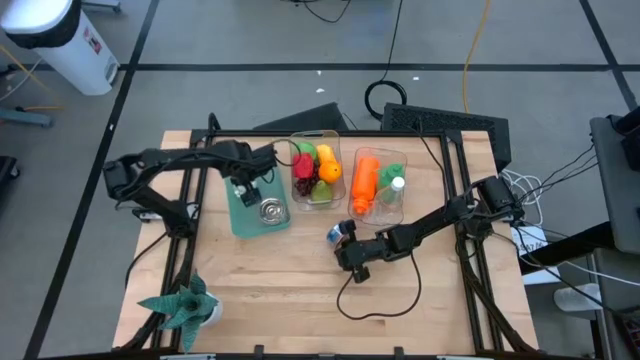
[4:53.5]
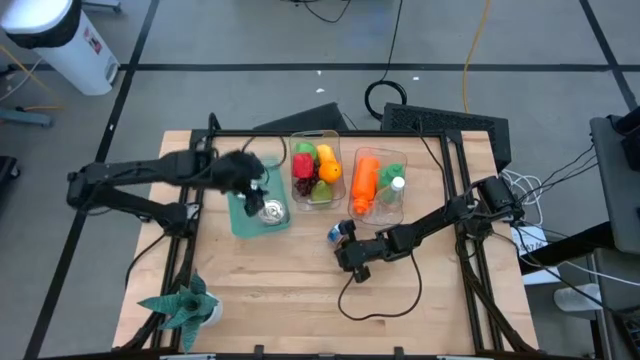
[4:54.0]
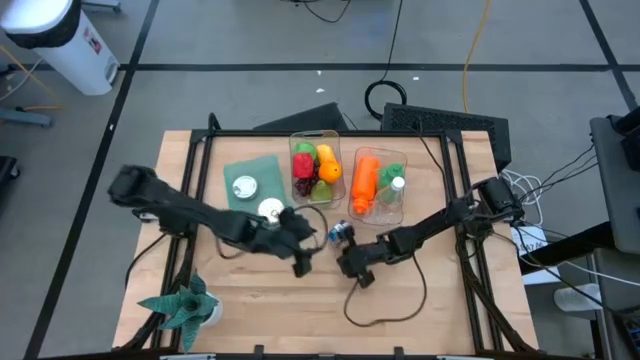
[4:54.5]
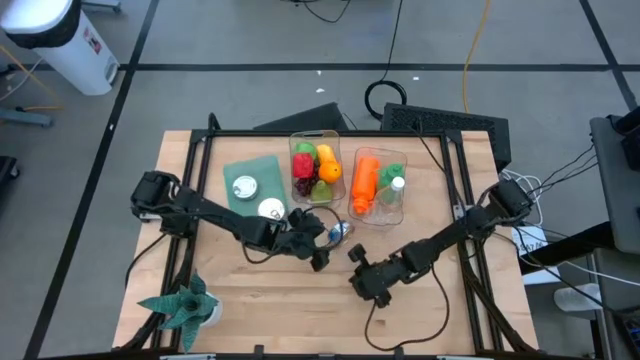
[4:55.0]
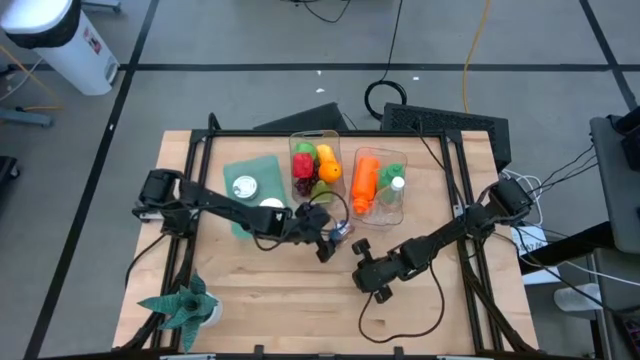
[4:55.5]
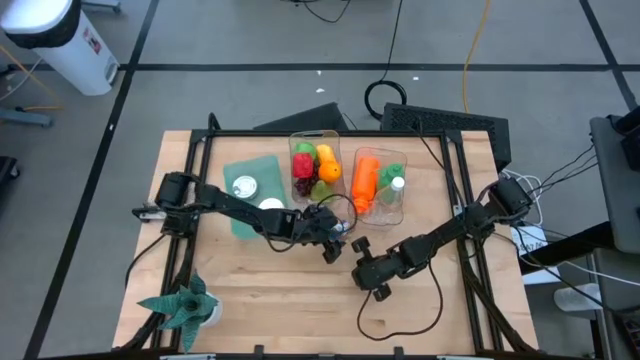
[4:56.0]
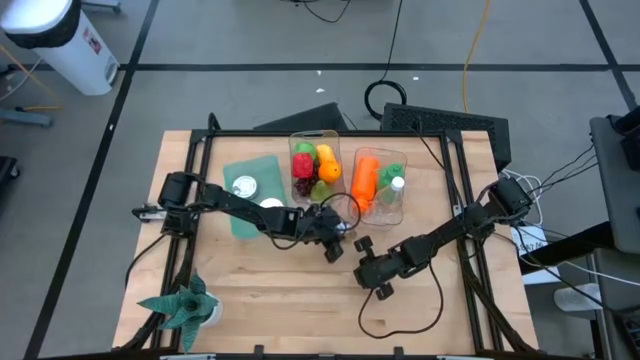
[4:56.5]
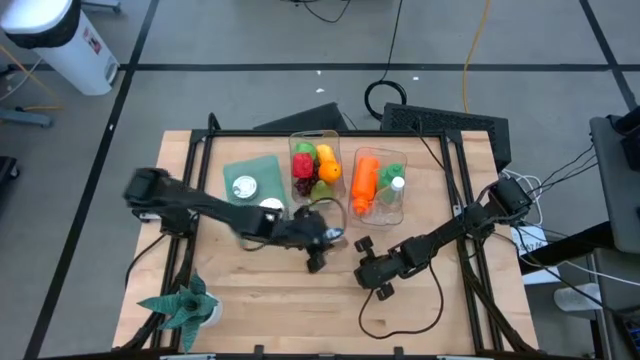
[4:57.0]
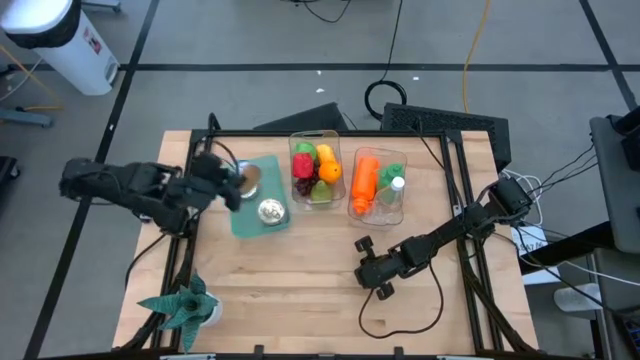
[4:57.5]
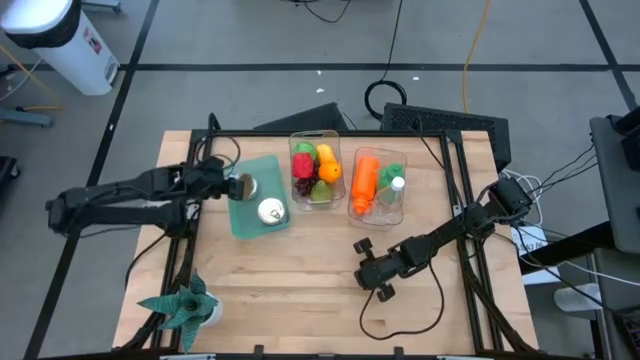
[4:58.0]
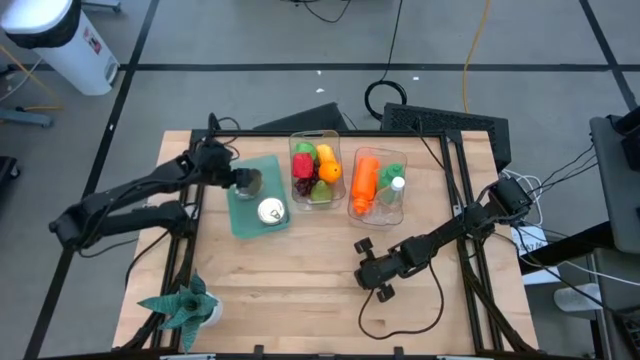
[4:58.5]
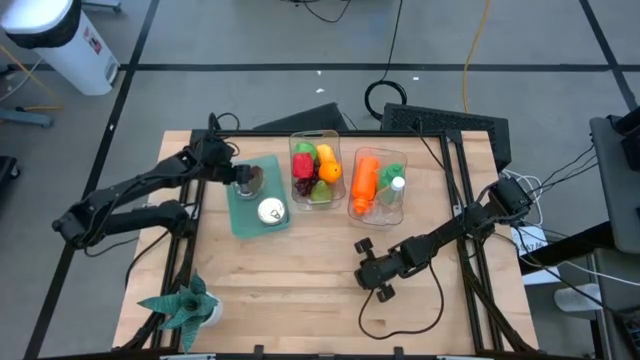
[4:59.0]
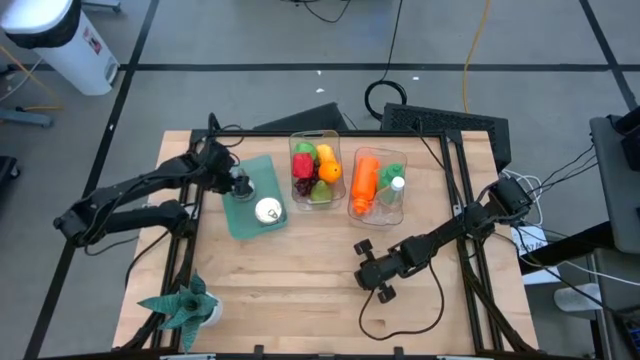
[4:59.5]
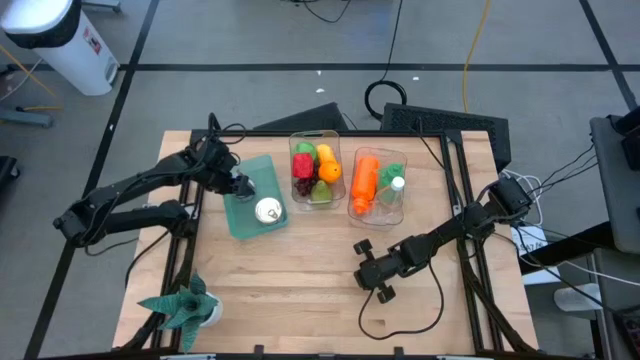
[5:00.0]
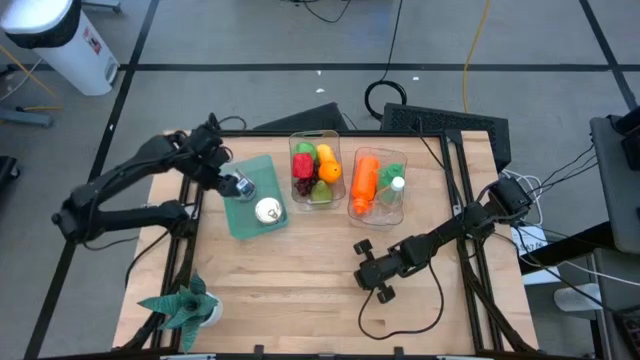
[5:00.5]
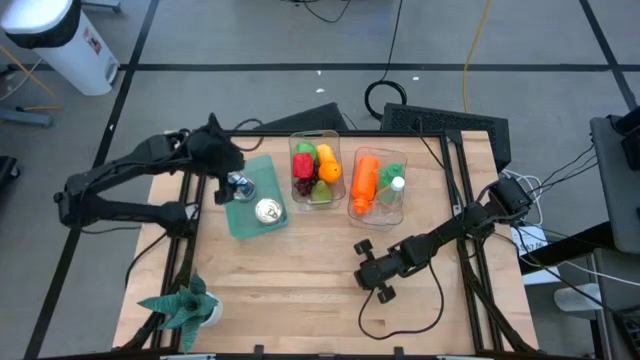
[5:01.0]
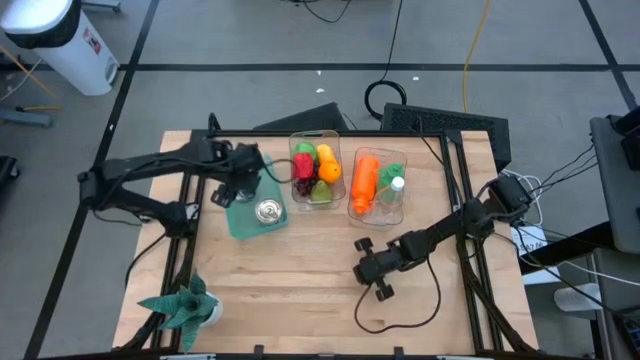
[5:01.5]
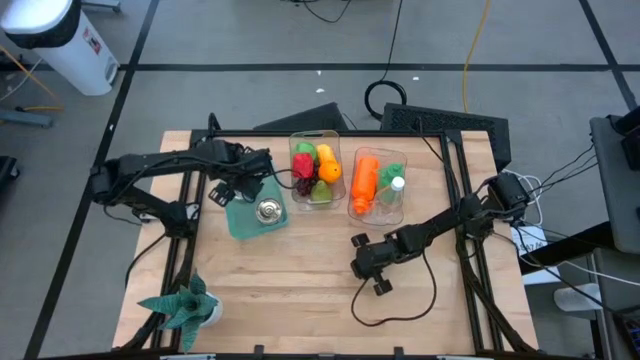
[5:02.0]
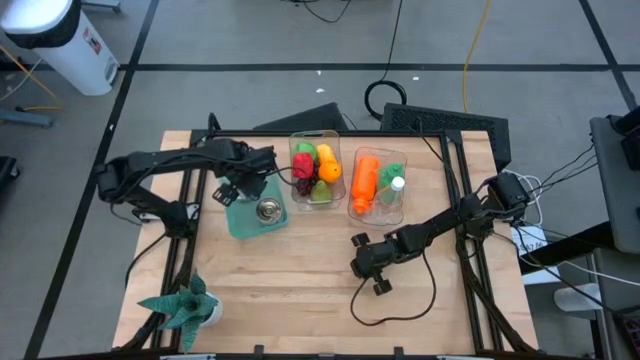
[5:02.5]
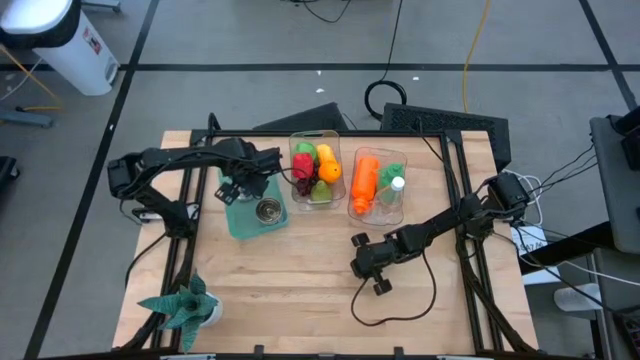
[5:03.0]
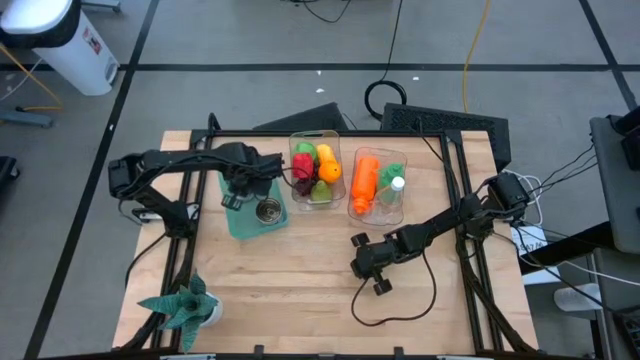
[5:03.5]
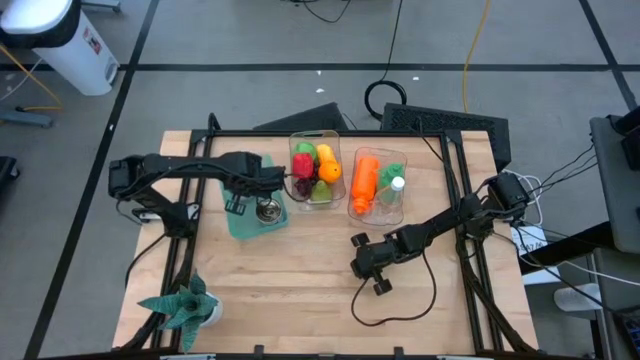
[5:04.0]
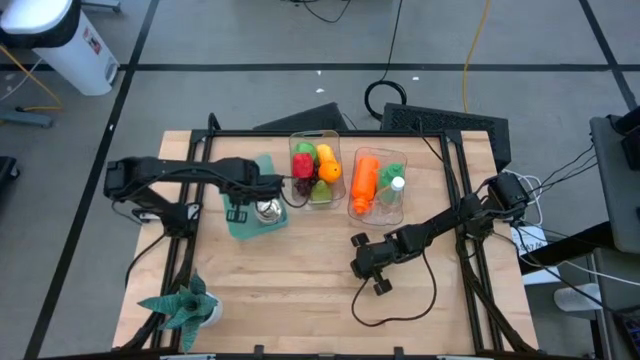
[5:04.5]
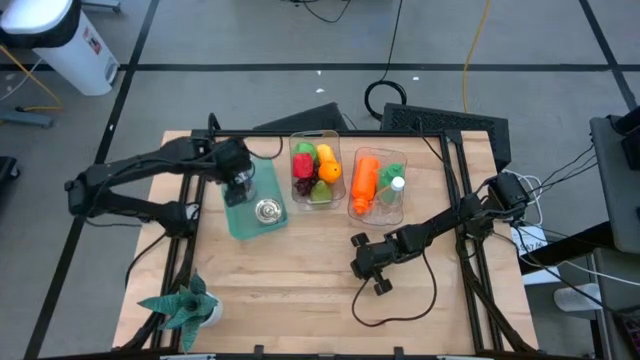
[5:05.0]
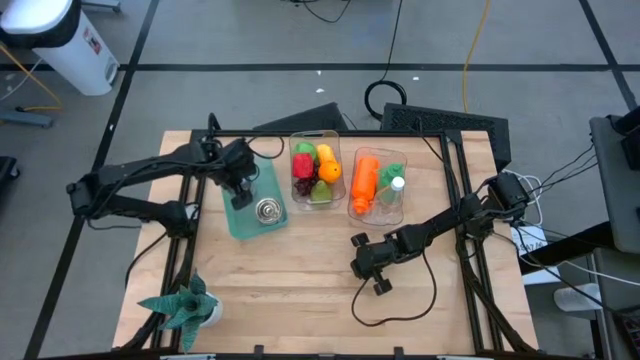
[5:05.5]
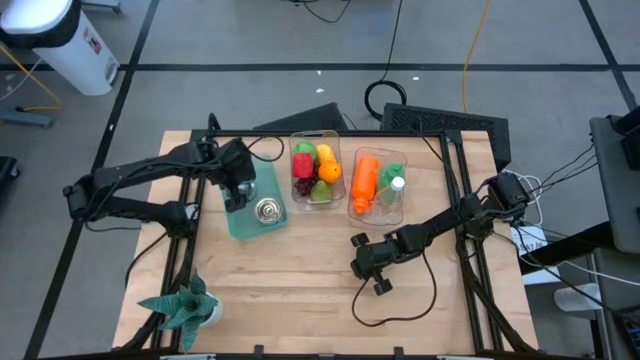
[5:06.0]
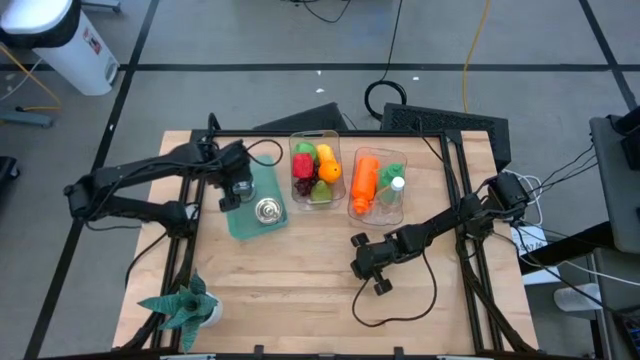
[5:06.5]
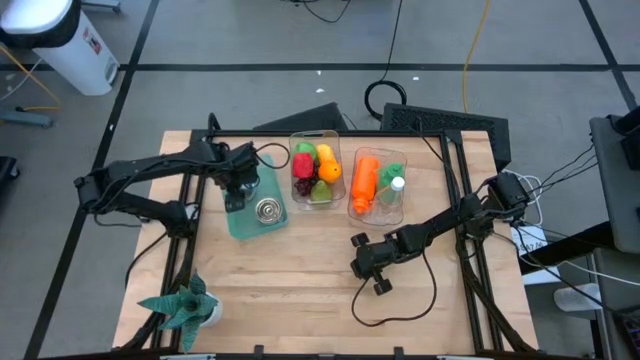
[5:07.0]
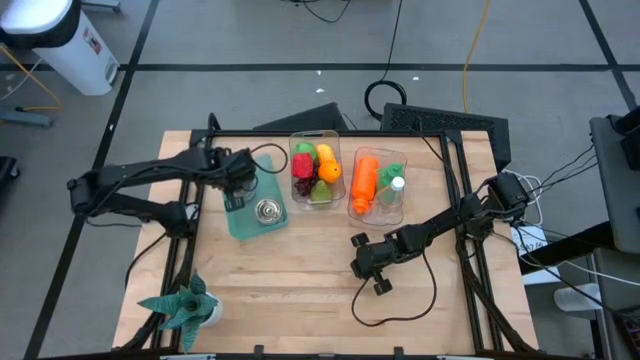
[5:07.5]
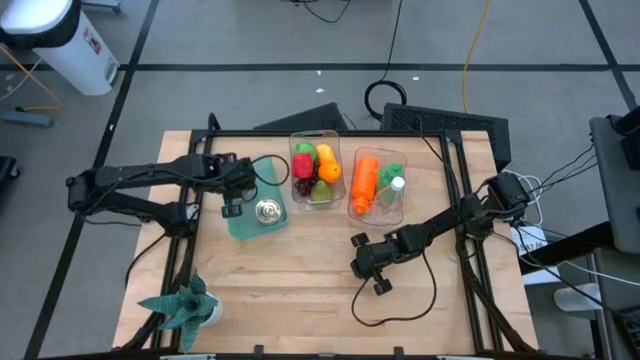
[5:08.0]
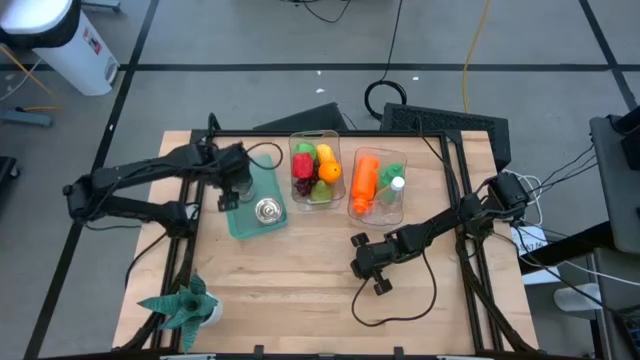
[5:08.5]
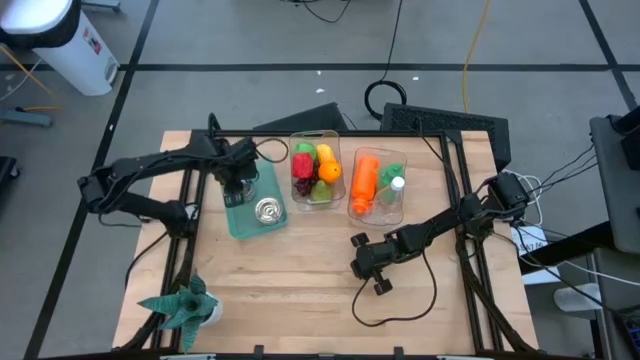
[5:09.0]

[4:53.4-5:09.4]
Task: Pick & Place Food Item
Stack the blue tuna can on top of the green tuna can in the green bin

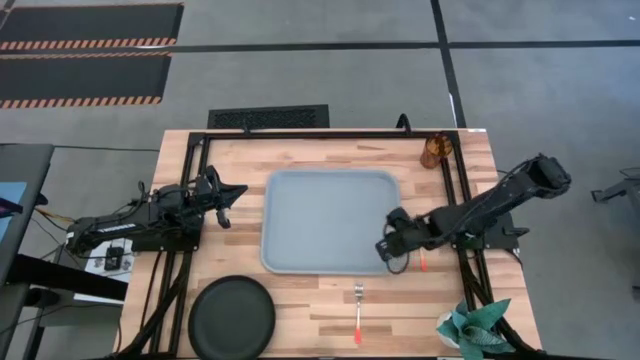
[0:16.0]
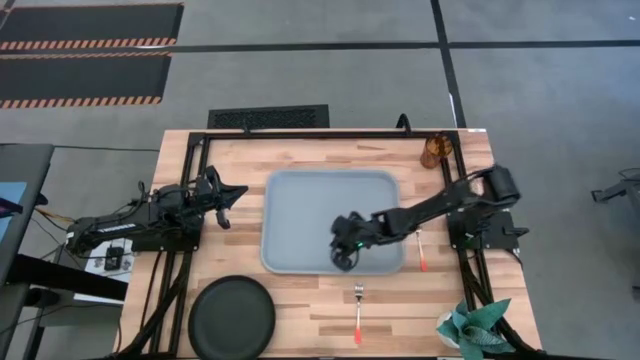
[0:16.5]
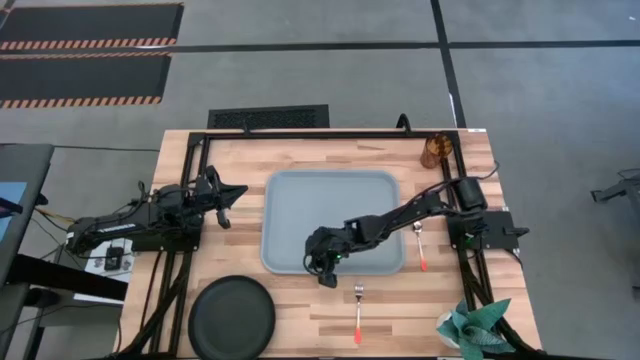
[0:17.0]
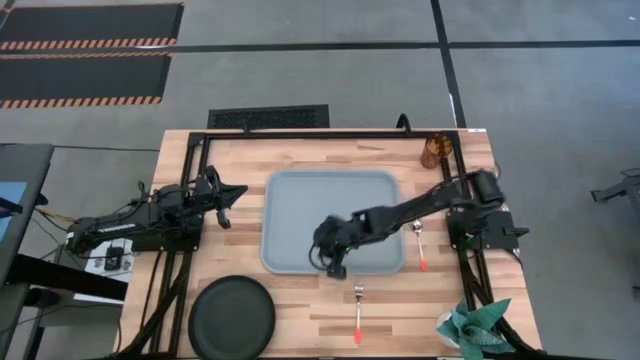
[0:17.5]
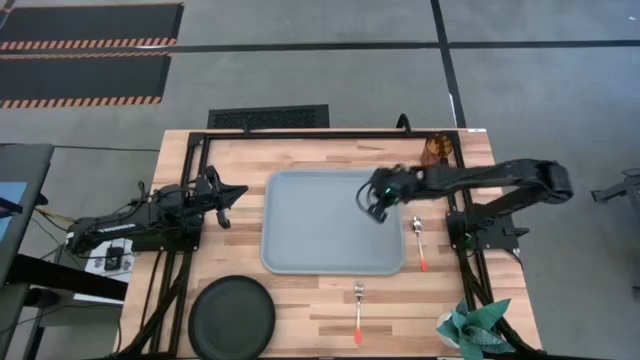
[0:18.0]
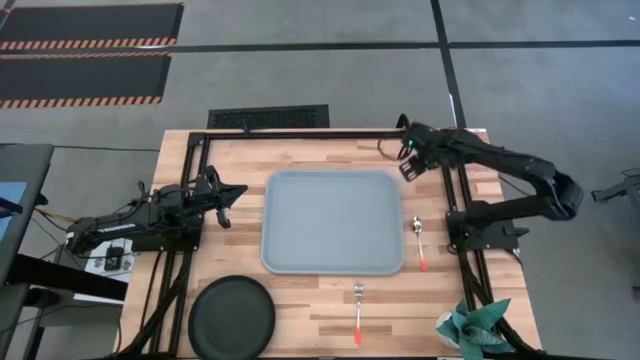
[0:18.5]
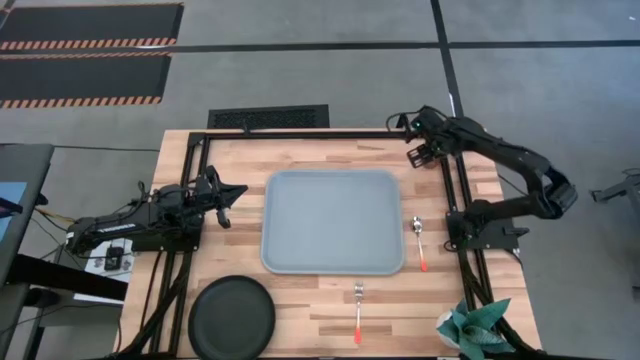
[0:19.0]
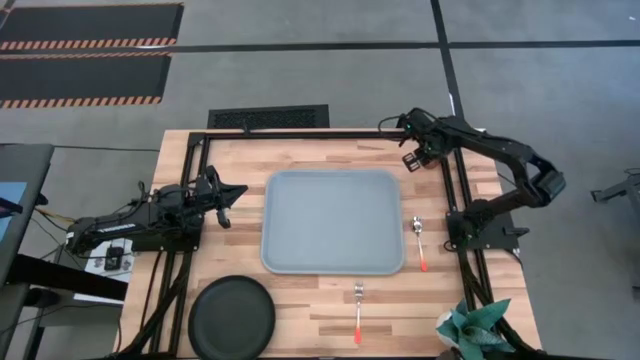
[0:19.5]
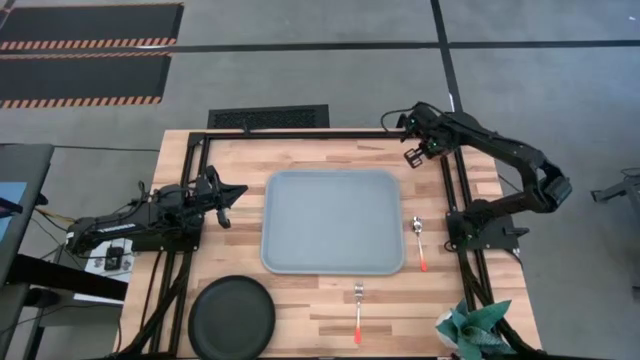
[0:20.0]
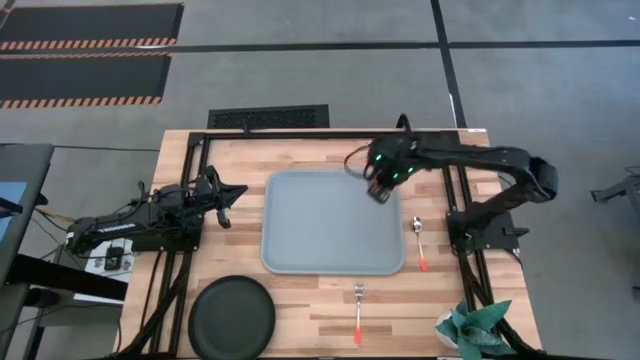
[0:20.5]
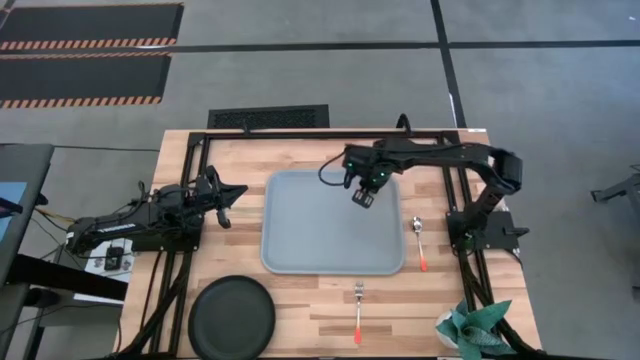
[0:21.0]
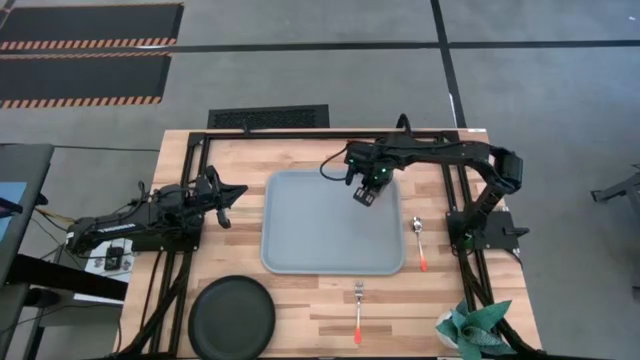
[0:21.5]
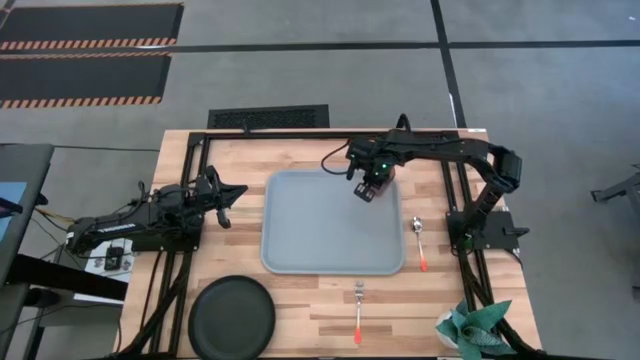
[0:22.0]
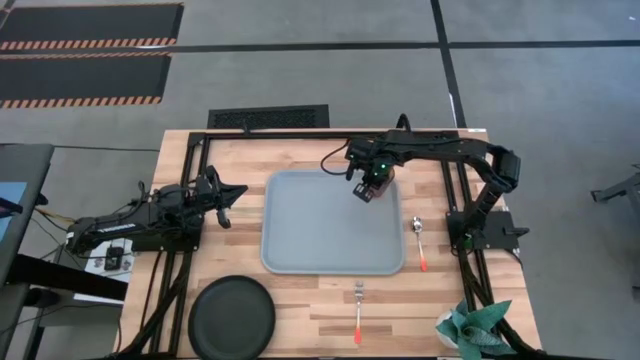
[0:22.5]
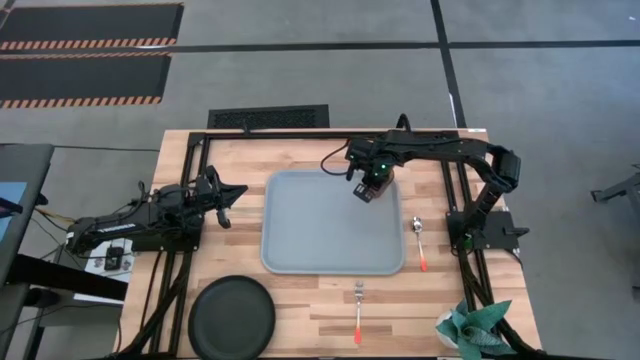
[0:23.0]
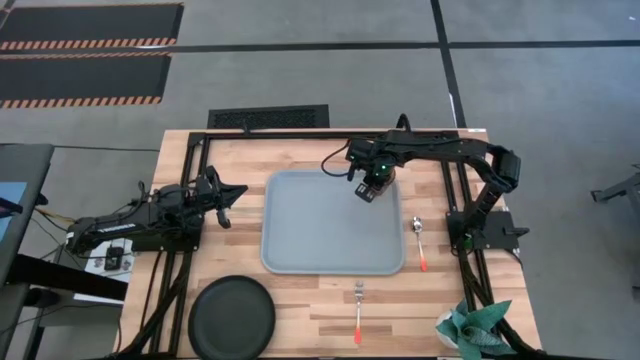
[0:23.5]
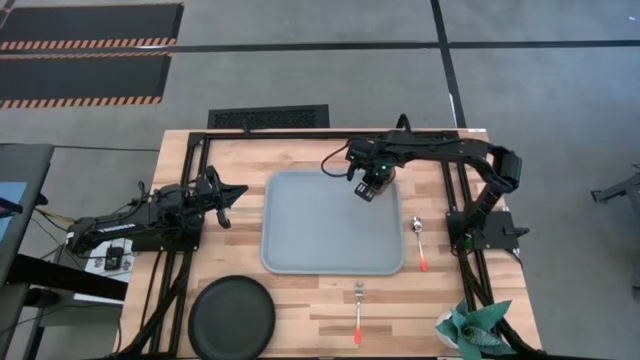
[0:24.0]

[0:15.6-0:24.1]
Task: Pick and place plate/cup/fork/spoon on tray
Put the brown cup on the gray serving tray
